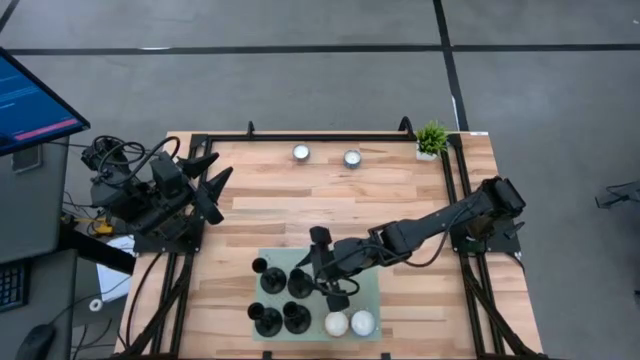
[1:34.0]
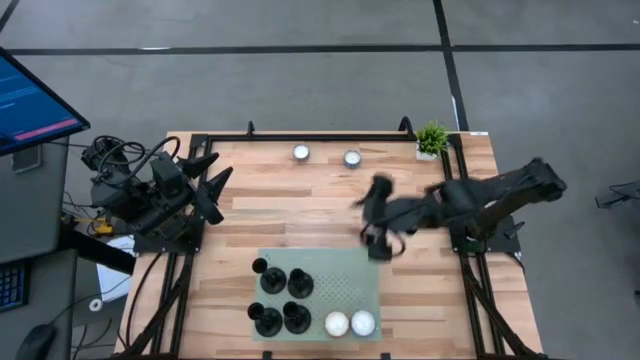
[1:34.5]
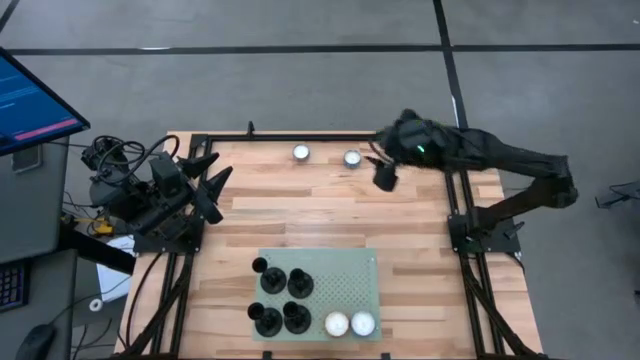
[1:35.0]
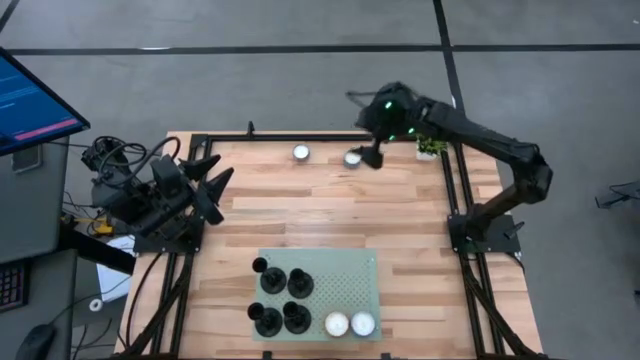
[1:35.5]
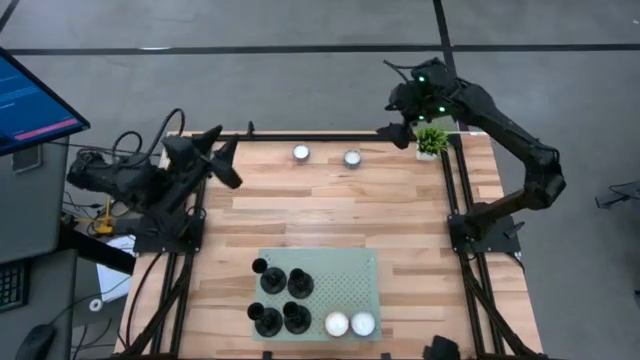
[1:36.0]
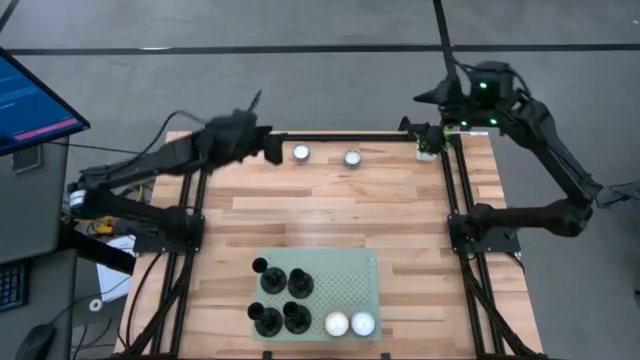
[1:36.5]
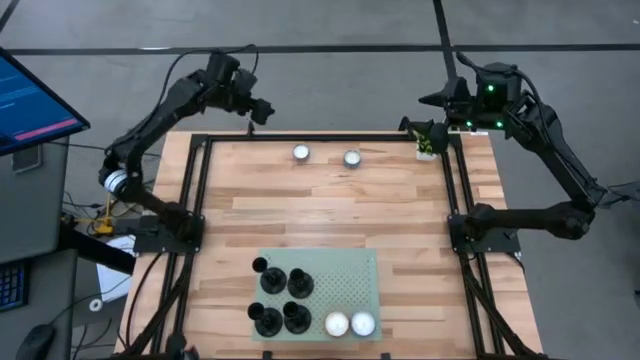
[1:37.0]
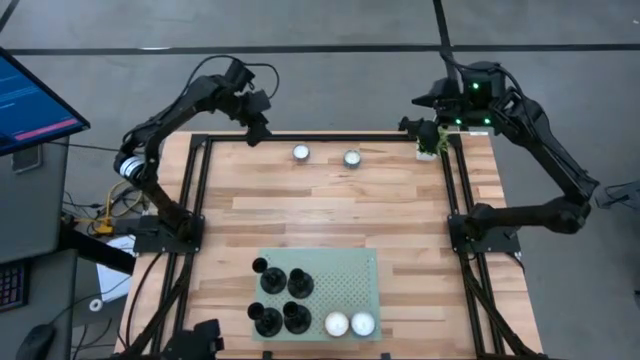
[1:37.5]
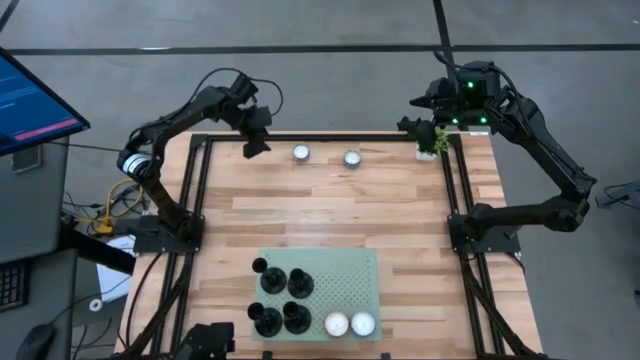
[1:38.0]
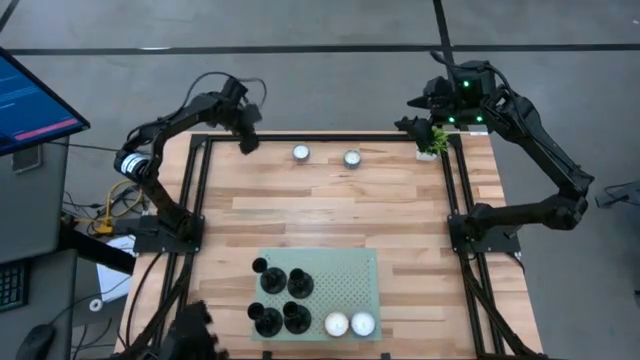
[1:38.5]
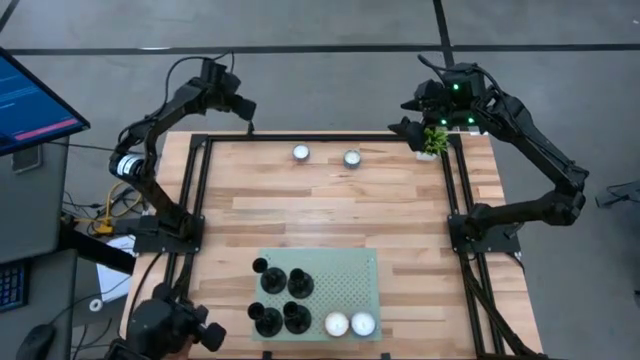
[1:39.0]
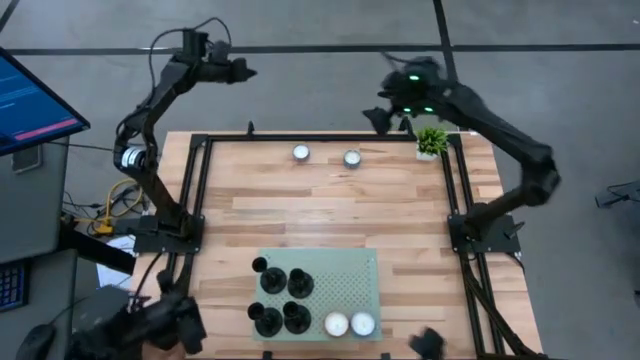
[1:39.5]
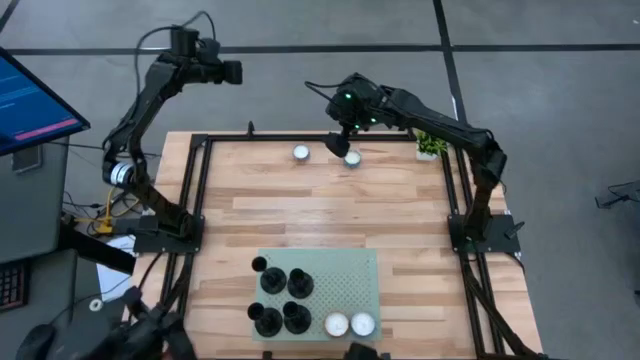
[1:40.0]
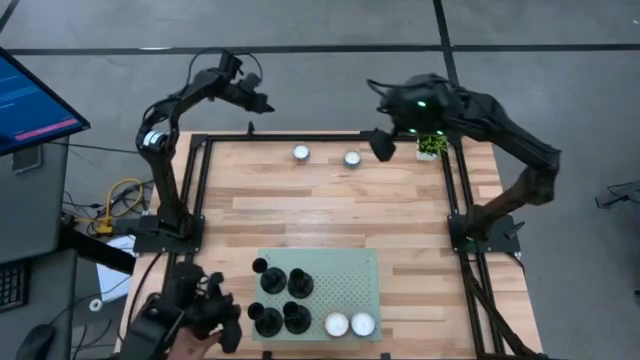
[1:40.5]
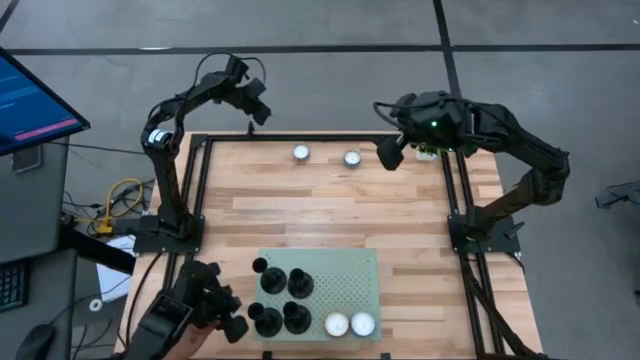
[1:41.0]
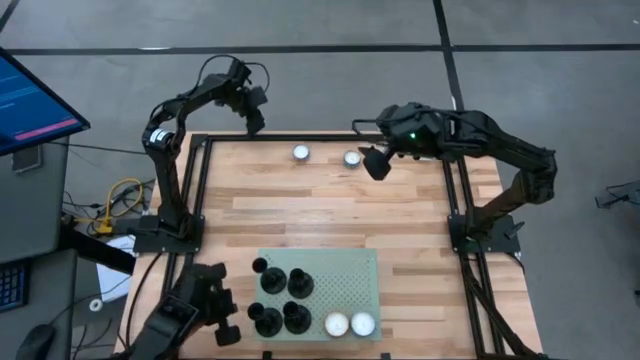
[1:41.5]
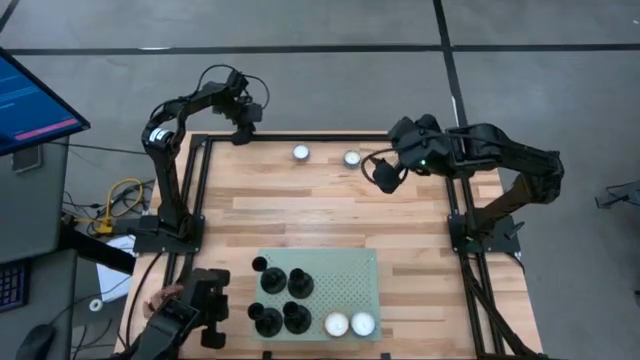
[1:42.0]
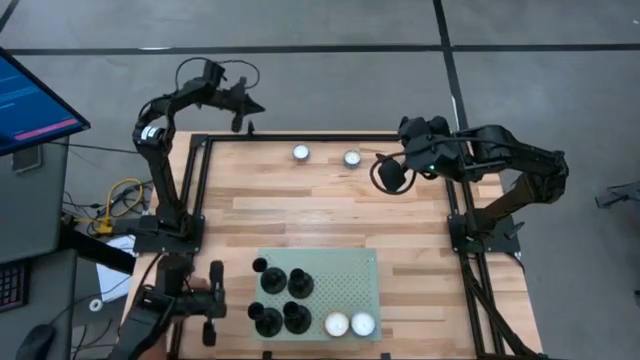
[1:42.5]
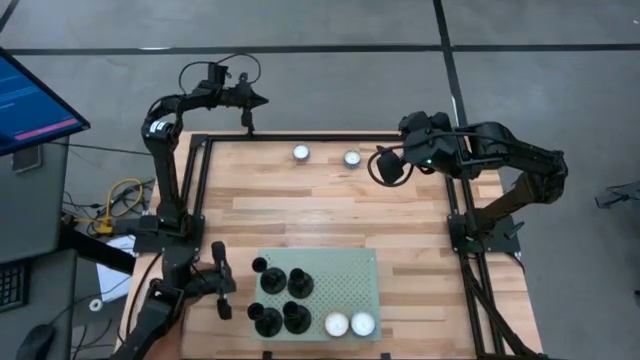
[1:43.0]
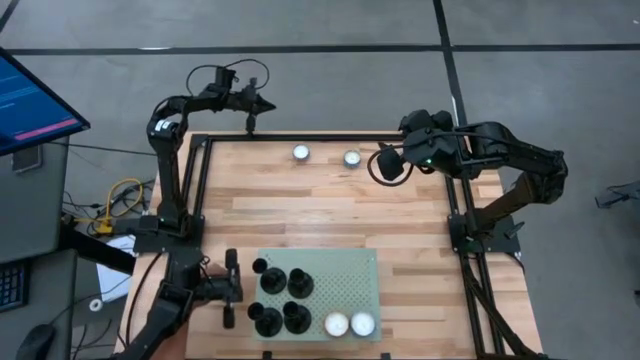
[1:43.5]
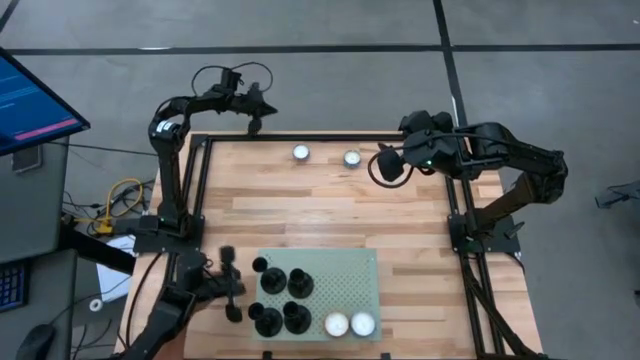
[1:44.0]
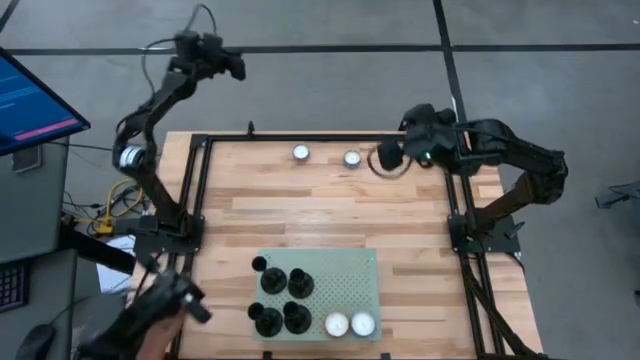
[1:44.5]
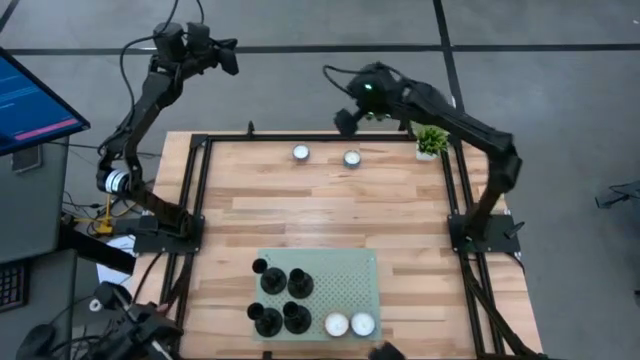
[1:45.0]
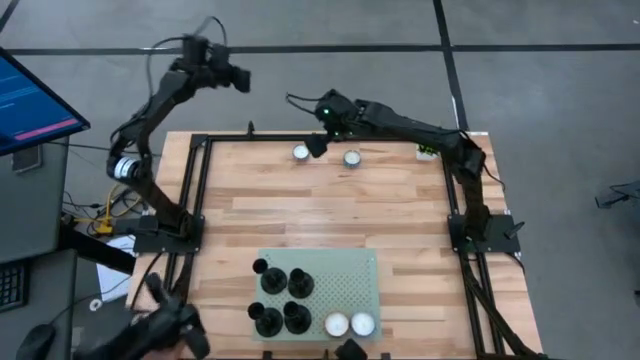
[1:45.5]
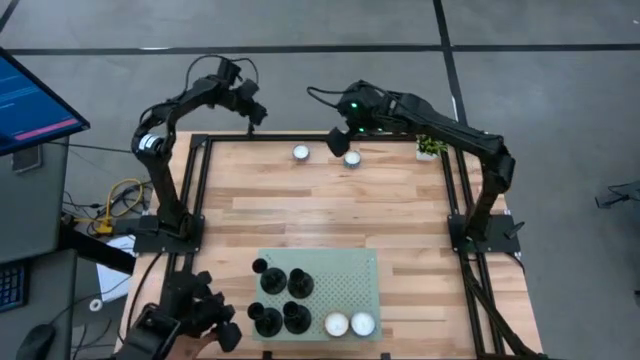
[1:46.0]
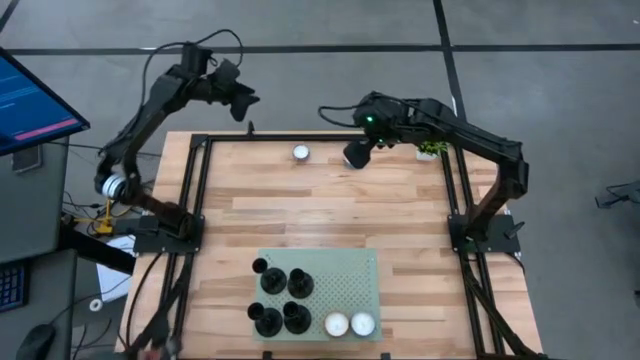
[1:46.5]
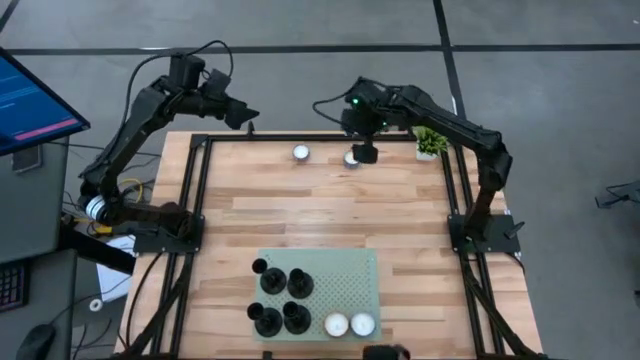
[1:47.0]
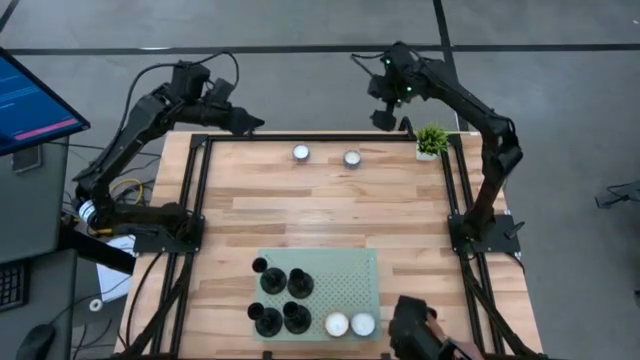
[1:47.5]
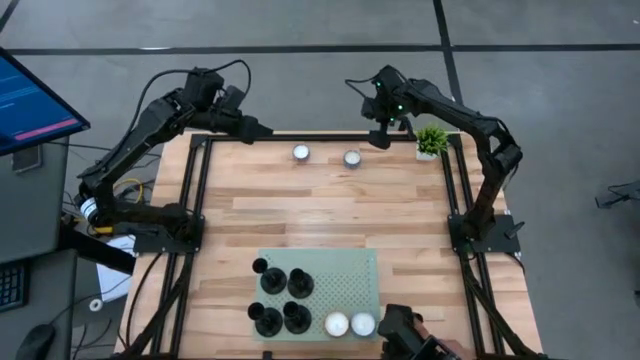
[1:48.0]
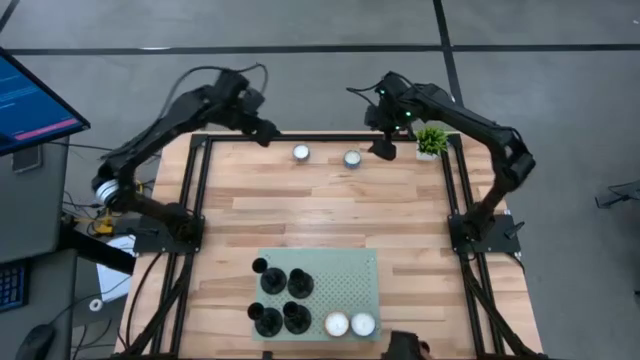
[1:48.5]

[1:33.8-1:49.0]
Task: Stock candles on shelf
Put the blue scented candle on the shelf

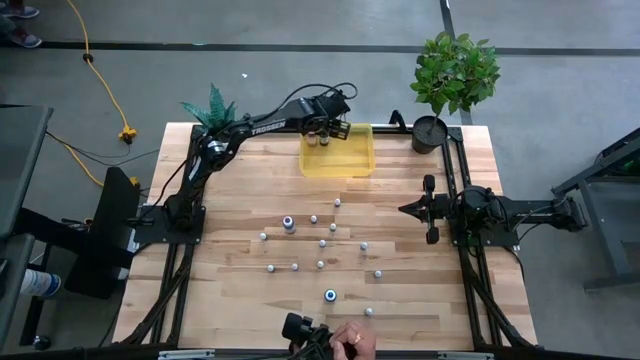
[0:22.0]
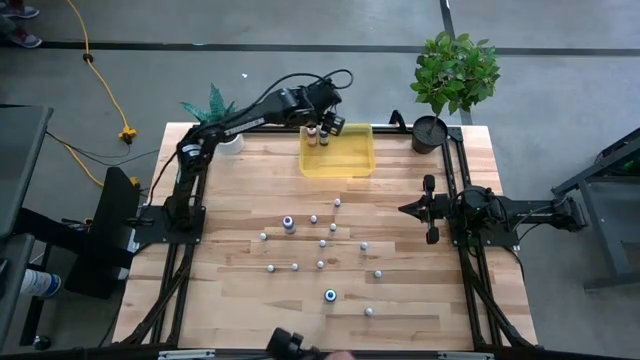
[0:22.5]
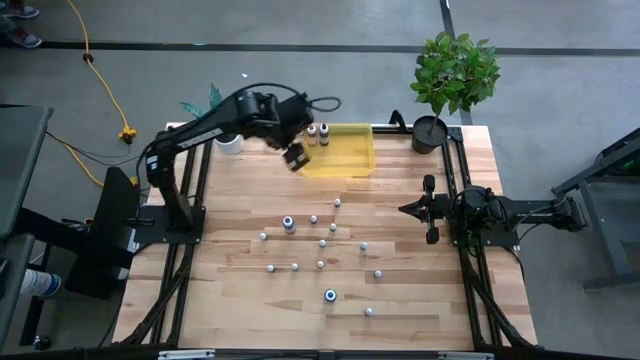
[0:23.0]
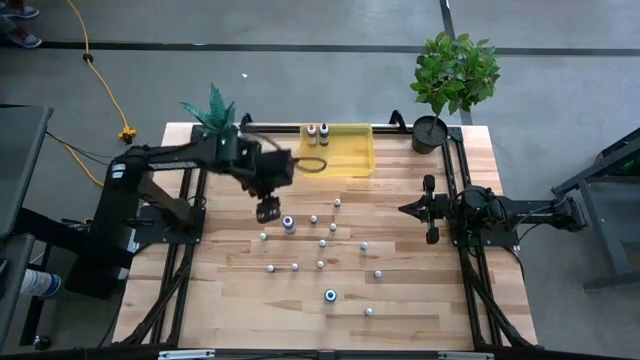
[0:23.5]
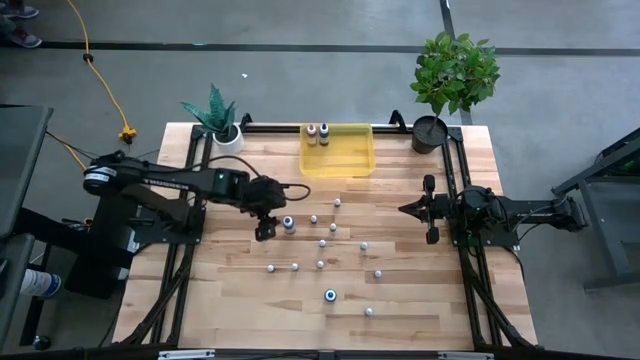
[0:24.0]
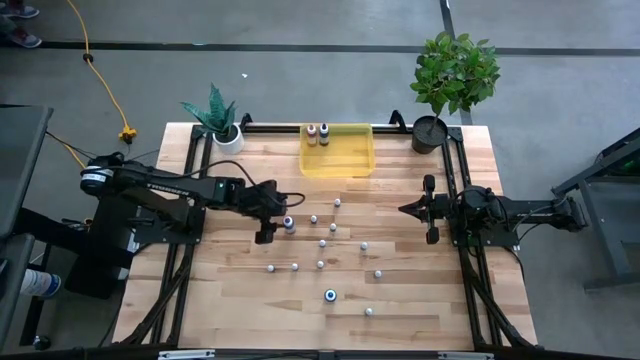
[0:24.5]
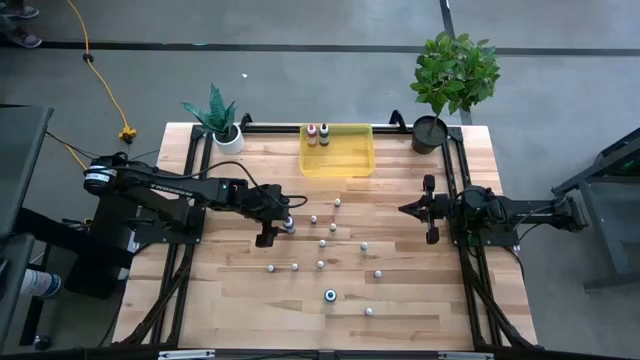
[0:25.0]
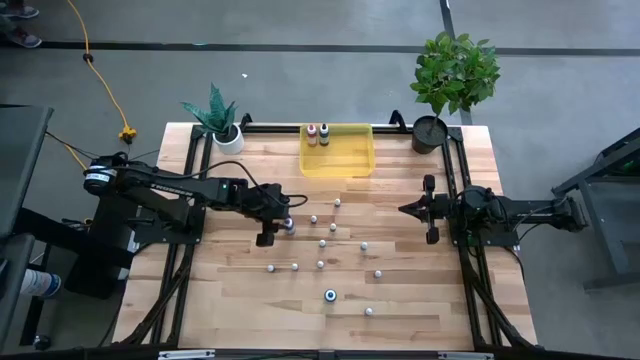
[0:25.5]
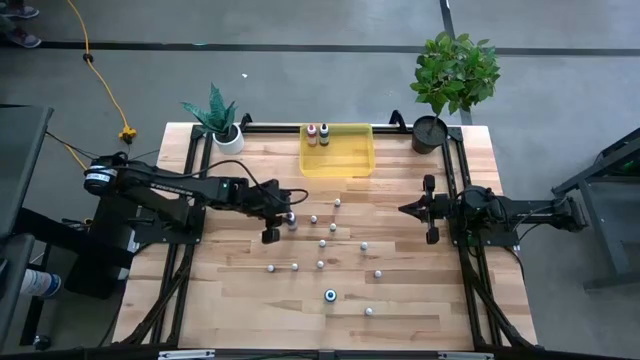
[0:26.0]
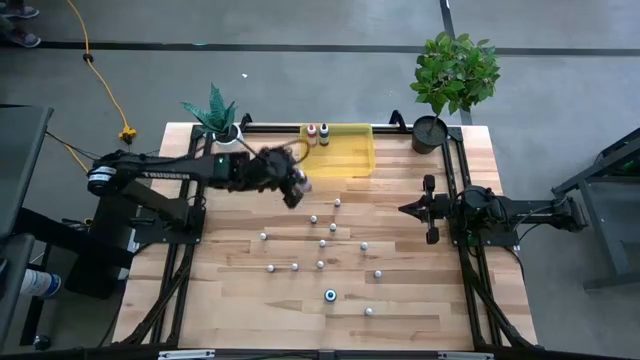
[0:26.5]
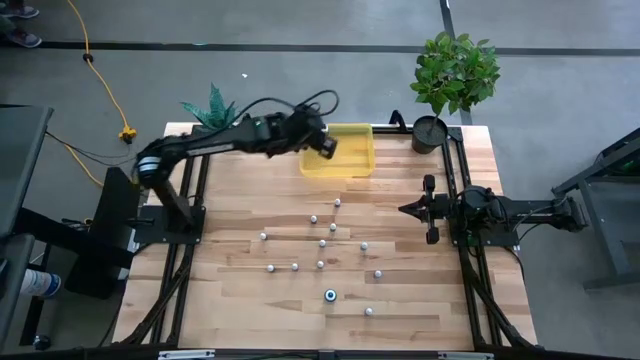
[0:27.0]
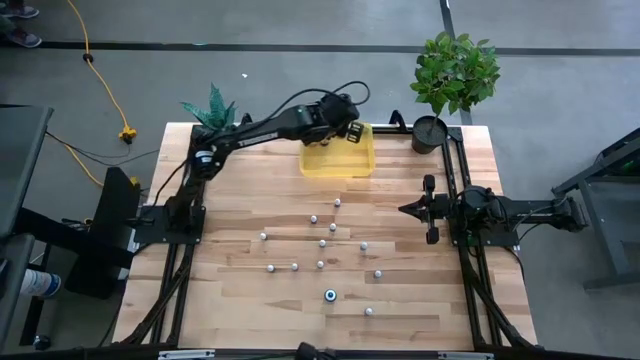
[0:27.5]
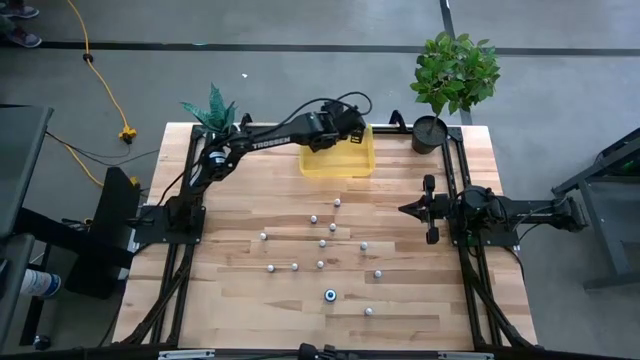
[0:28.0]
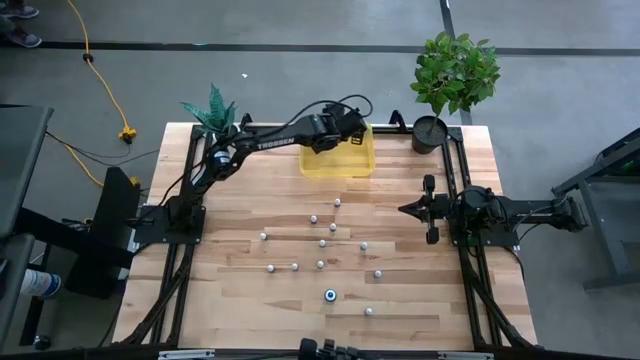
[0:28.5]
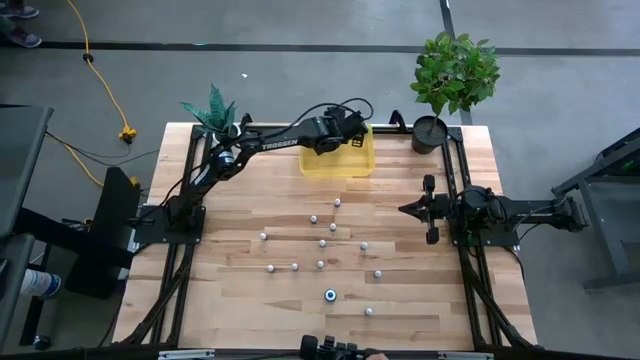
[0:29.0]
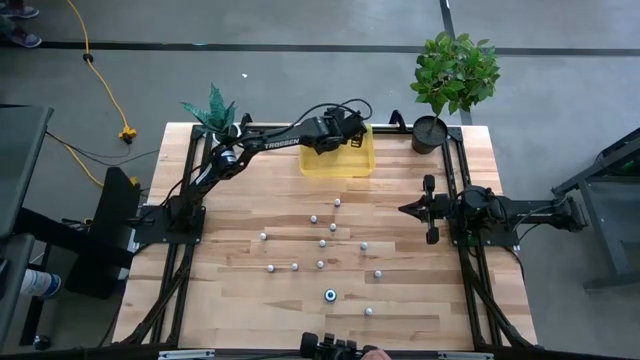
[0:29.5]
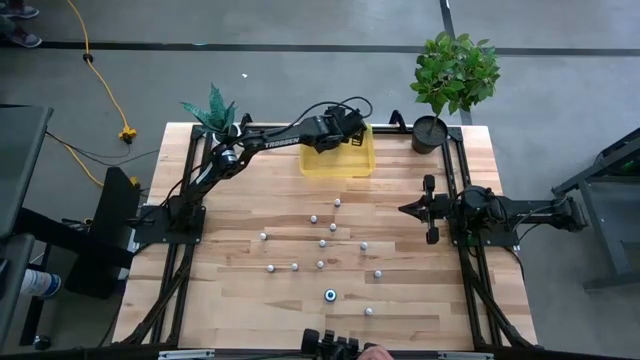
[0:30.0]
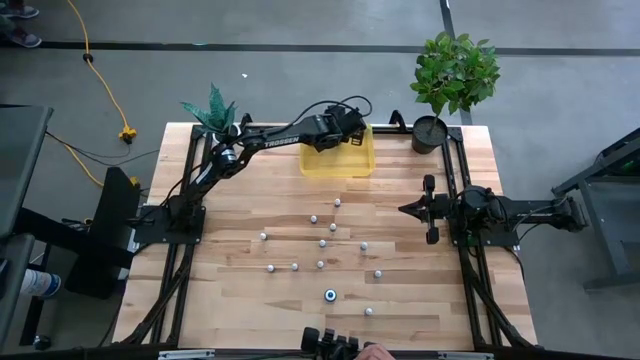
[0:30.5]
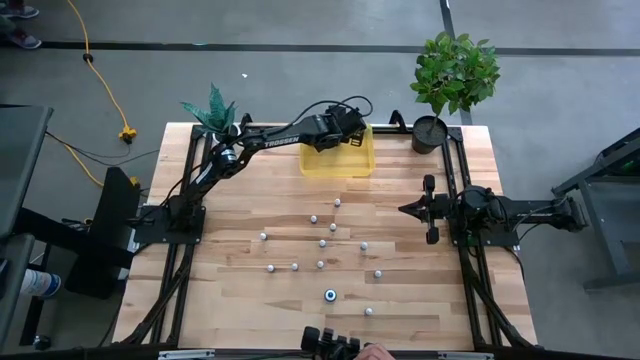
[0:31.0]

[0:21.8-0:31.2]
Task: Pick & Place food coloring
Put the large purple food coloring bottle into the yellow bin
